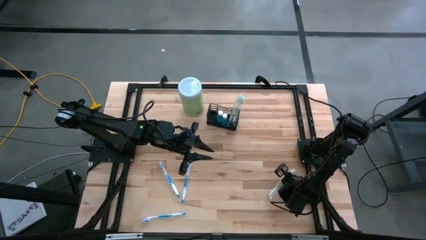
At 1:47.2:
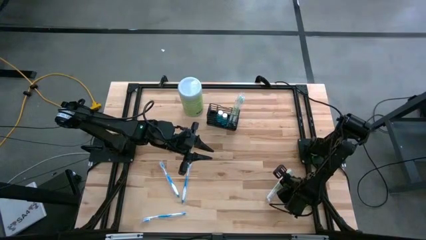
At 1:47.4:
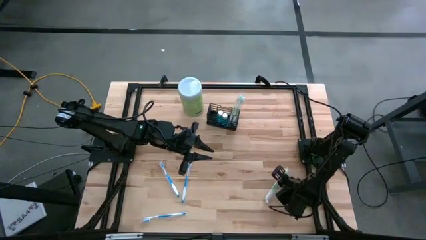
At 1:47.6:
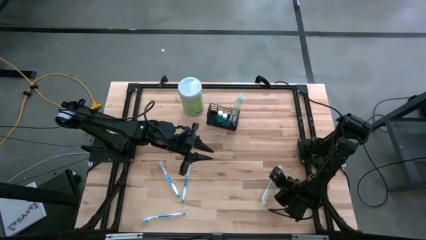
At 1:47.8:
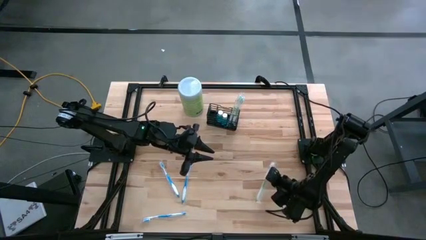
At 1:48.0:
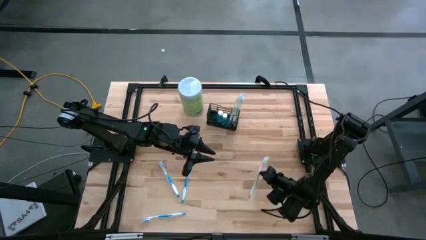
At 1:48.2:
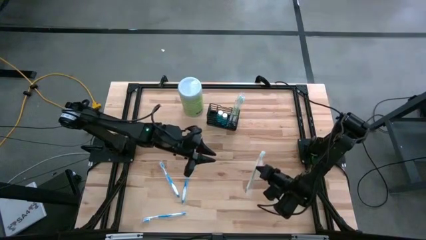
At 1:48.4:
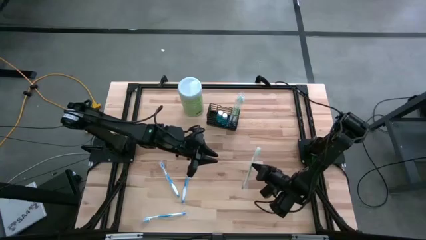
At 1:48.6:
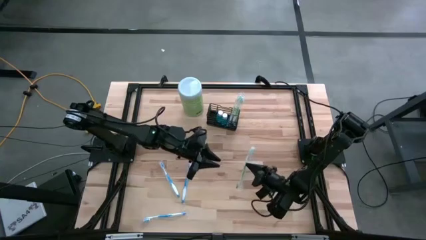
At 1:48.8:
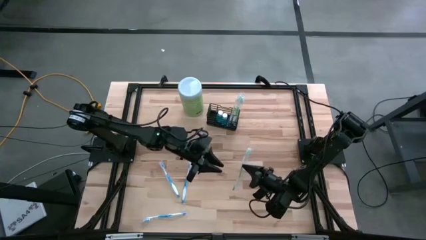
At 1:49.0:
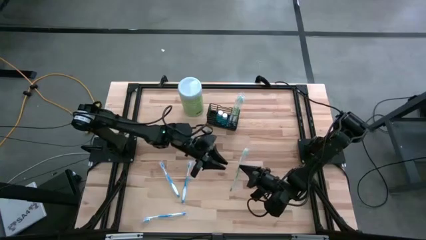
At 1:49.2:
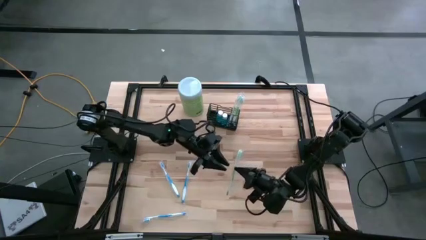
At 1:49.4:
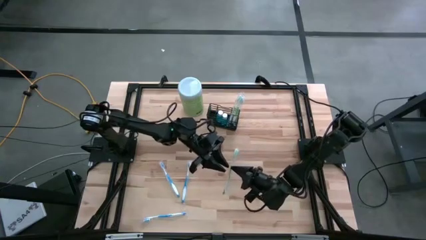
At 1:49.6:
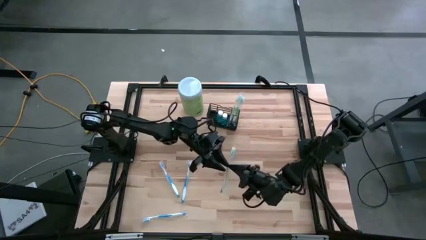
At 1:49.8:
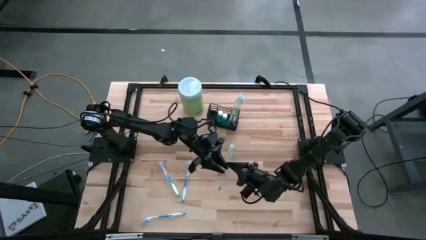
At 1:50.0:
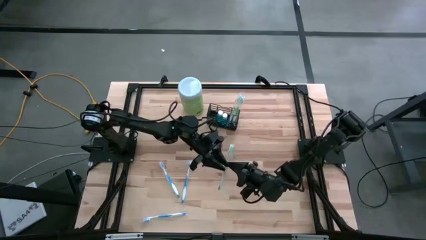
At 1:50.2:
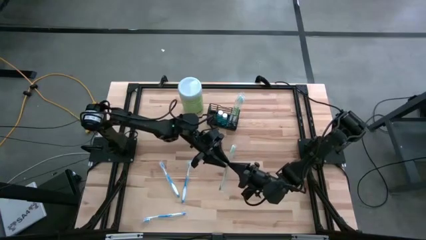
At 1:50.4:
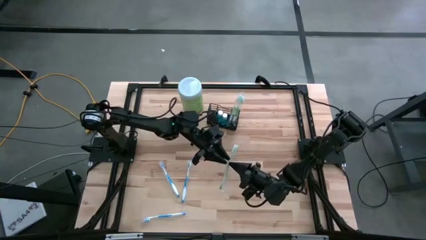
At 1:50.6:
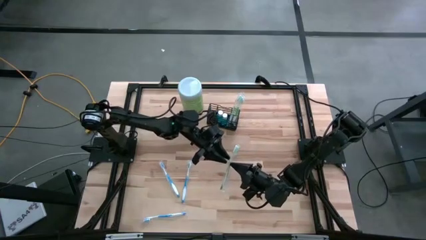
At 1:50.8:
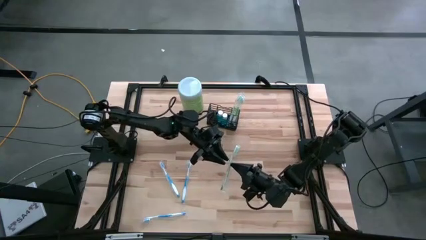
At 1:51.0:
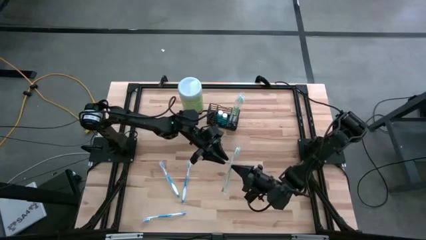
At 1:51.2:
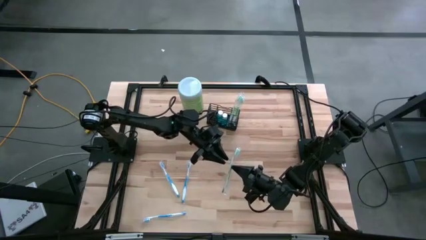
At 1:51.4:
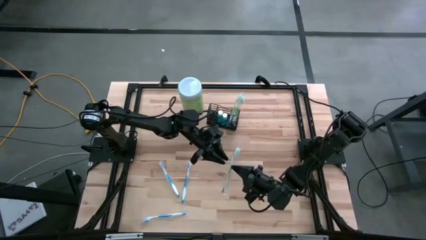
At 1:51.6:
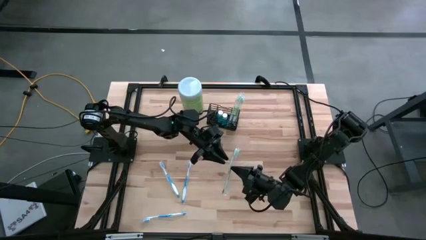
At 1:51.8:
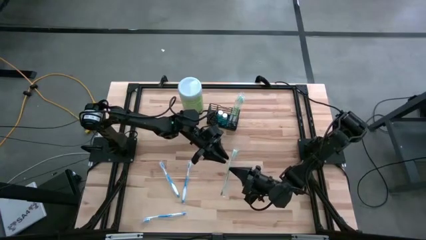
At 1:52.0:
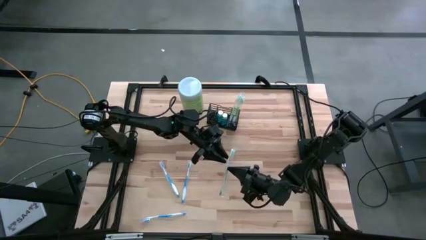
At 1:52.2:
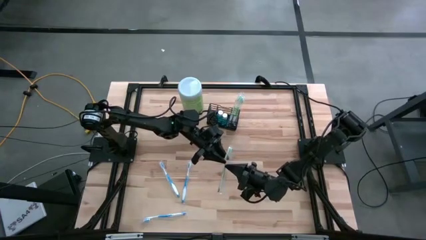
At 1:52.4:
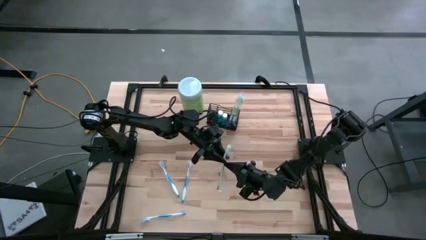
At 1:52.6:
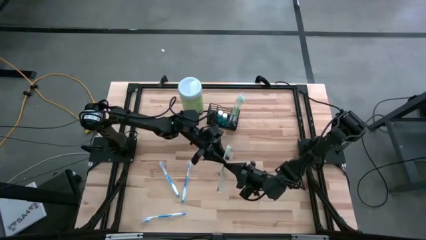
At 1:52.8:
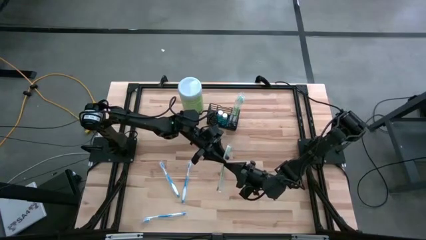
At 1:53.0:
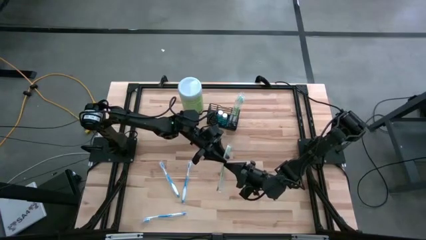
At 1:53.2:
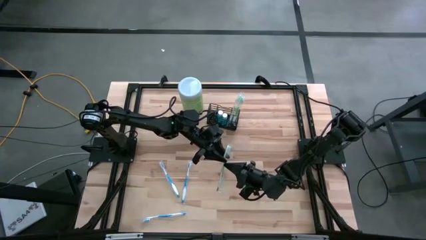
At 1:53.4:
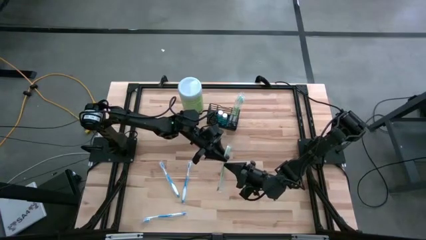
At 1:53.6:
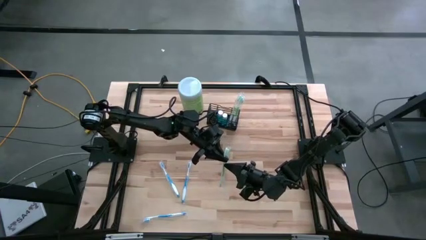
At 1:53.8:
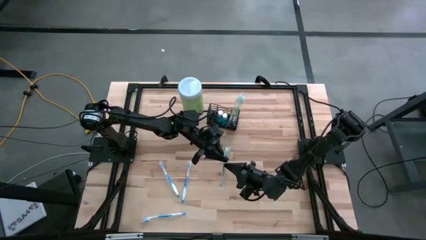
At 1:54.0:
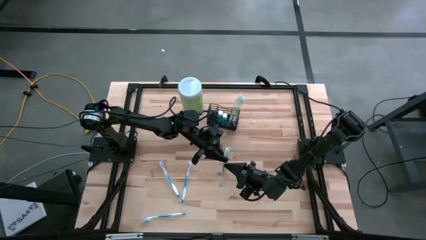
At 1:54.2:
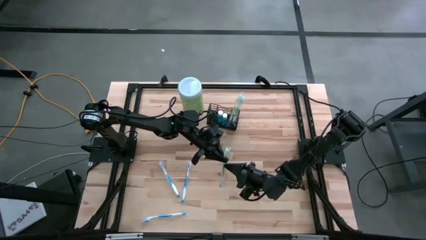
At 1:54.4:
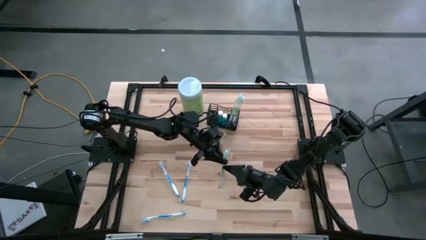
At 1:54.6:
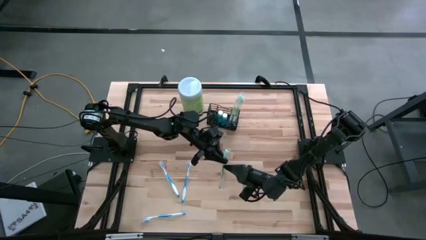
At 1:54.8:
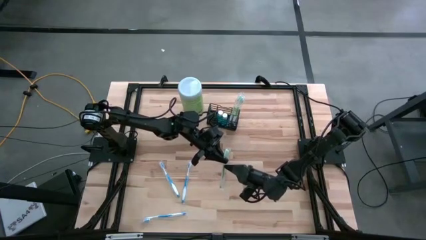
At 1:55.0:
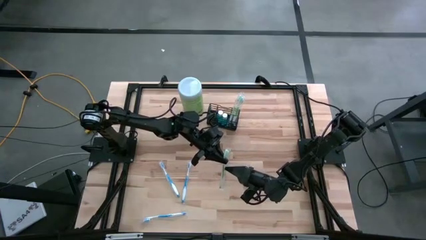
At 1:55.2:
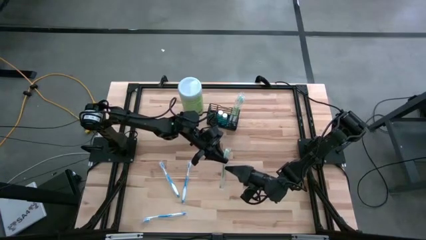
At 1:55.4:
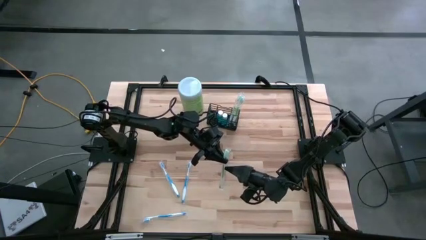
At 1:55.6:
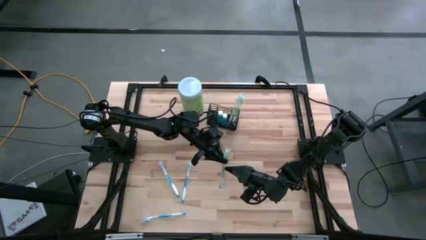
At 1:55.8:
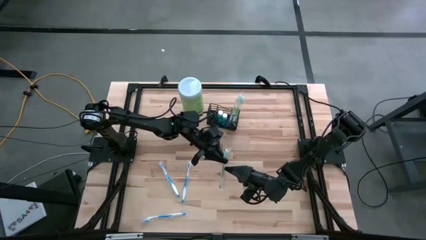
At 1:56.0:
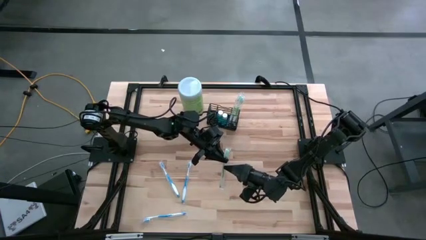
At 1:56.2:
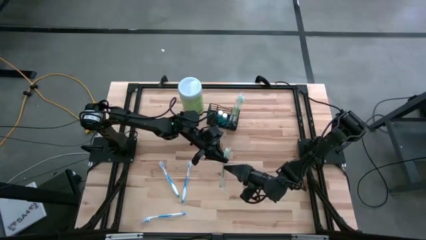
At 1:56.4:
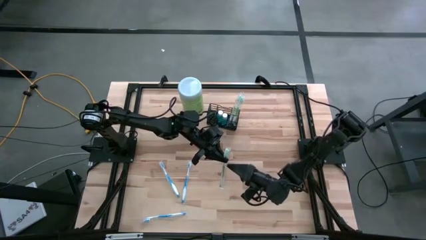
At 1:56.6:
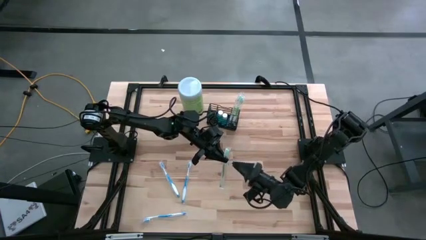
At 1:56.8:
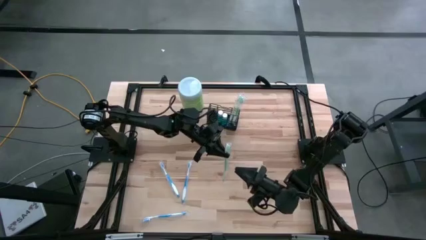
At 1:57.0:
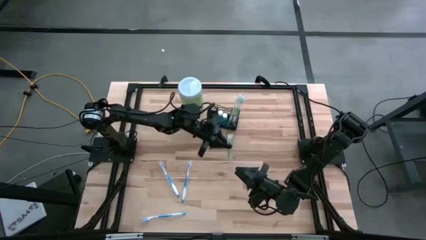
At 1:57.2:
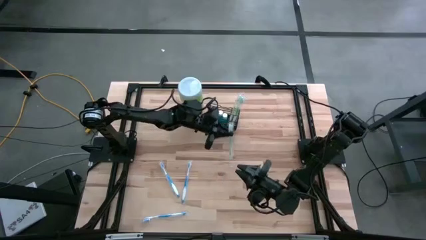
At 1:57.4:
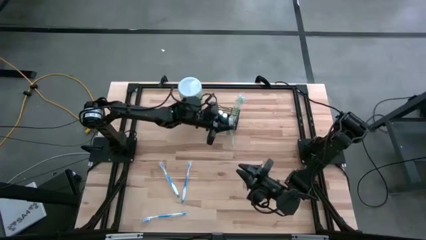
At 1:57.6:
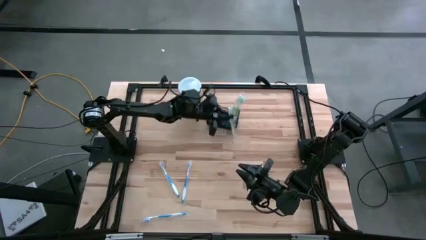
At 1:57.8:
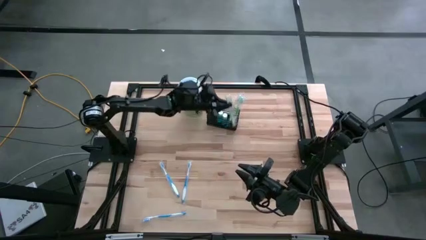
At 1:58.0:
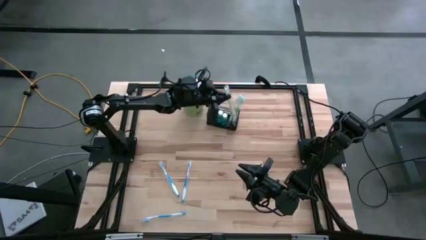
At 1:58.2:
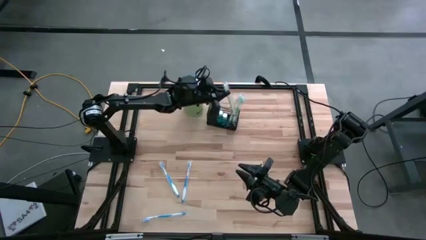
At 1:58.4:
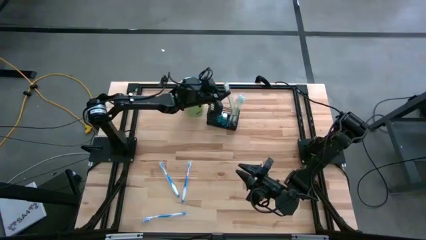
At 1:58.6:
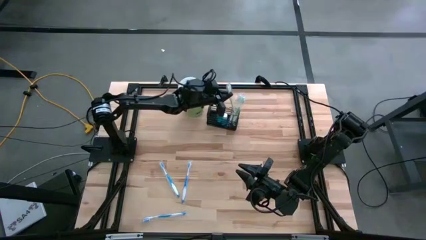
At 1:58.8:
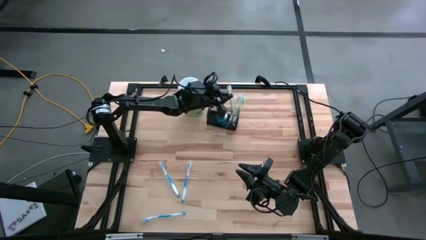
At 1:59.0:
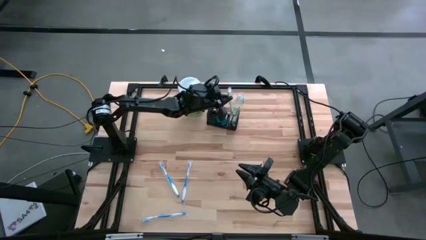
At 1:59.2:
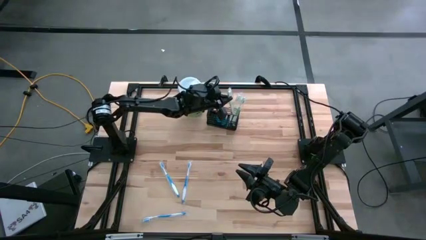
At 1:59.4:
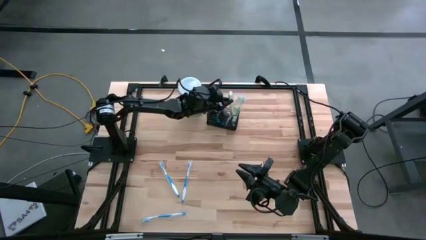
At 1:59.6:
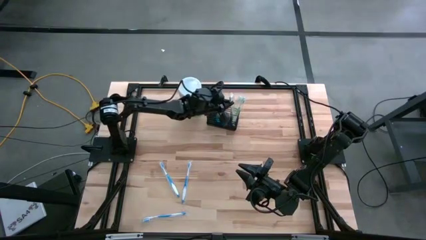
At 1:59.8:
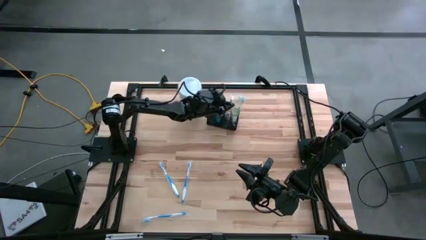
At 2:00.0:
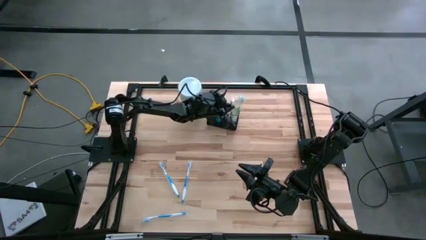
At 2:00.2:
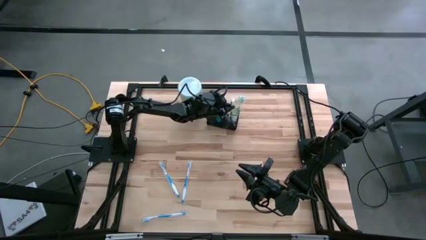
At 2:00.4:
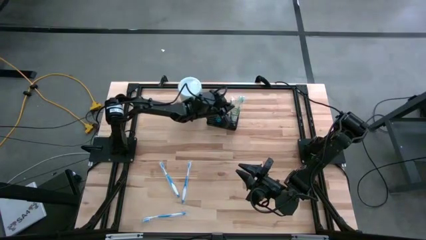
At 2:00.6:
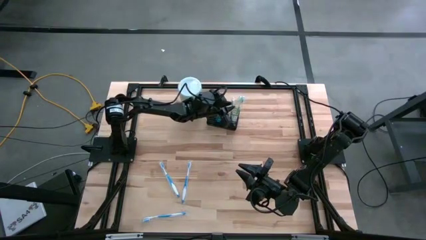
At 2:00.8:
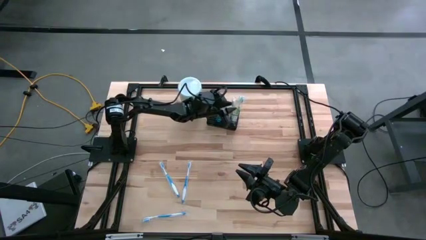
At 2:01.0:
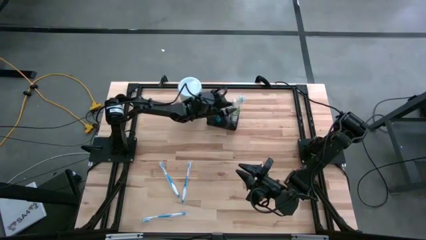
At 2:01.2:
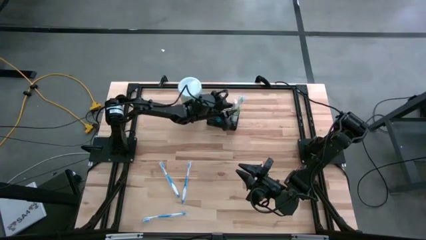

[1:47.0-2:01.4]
Task: Pick & Place toothbrushing station
Put the green toothbrush into the mesh organizer

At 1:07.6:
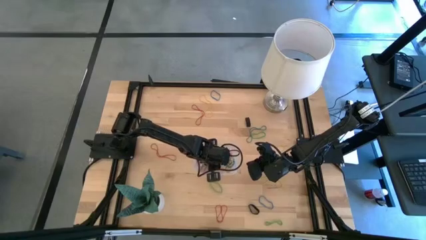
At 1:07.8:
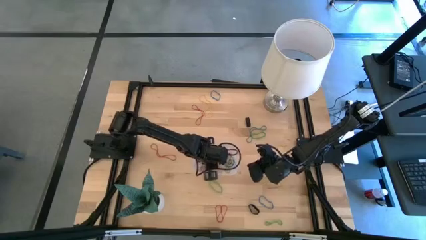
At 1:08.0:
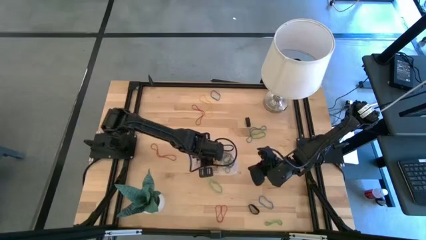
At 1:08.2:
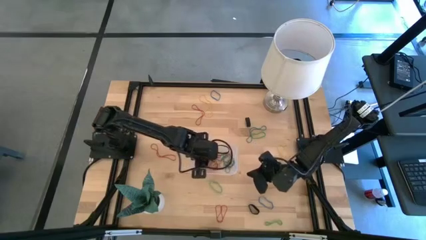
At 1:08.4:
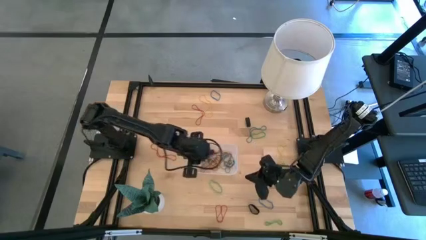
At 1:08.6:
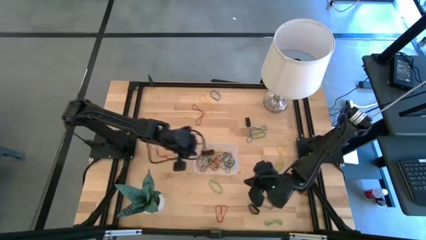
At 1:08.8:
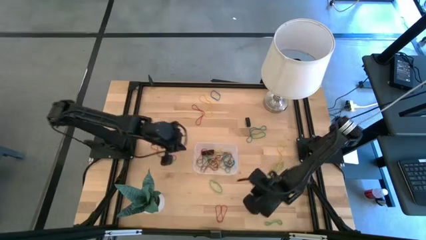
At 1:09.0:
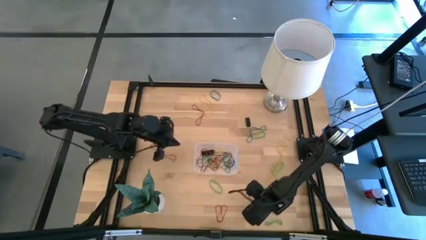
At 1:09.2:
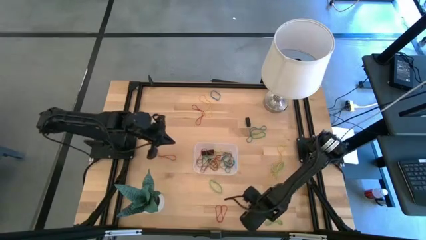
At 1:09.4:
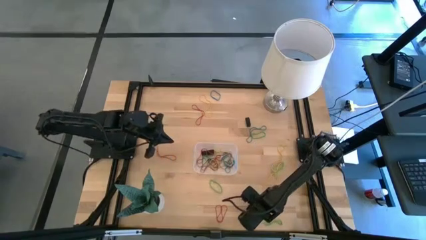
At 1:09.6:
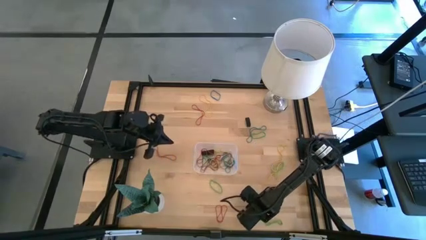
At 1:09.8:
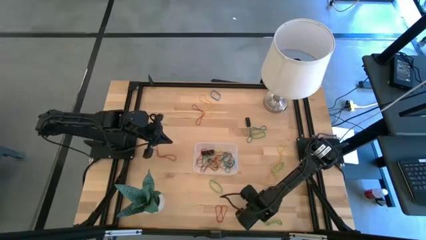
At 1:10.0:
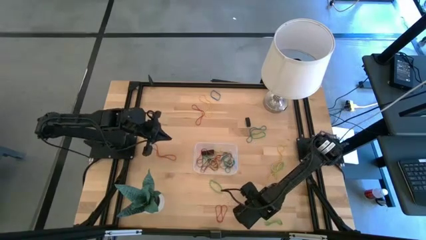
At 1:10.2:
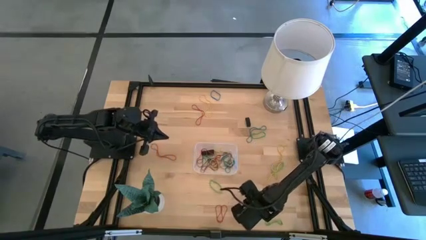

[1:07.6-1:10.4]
Task: Pick and place rubber bands into bin
Put the black rubber band into the transparent bin
